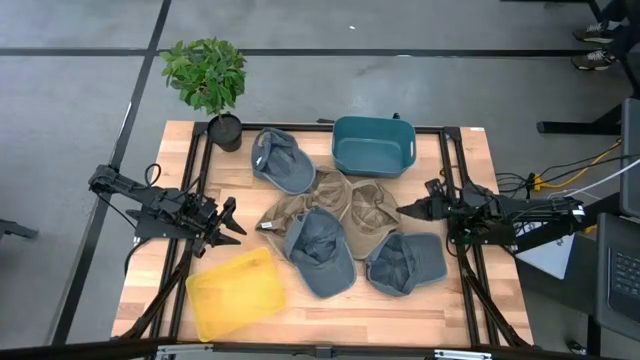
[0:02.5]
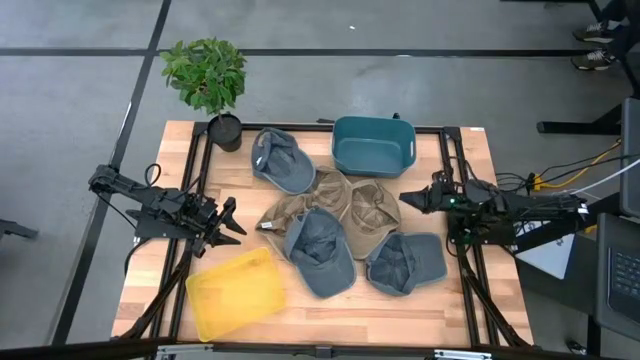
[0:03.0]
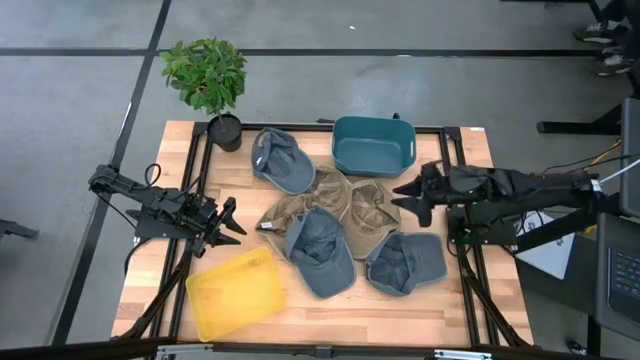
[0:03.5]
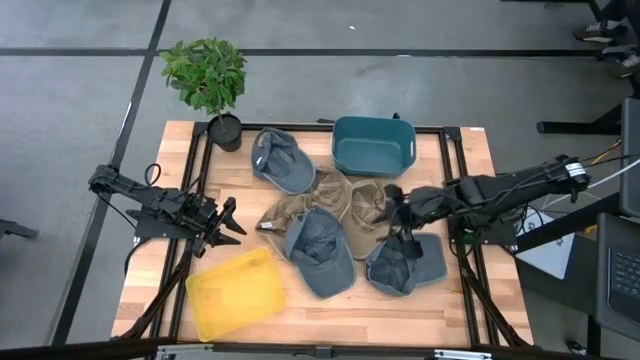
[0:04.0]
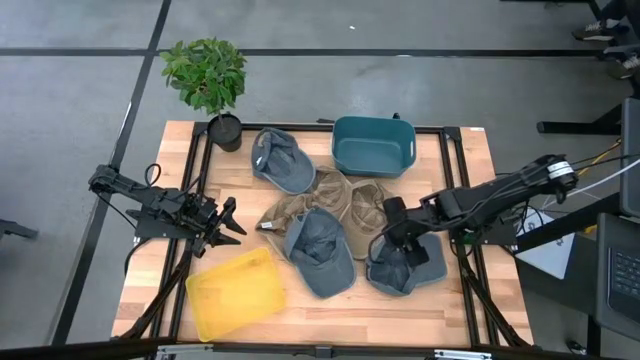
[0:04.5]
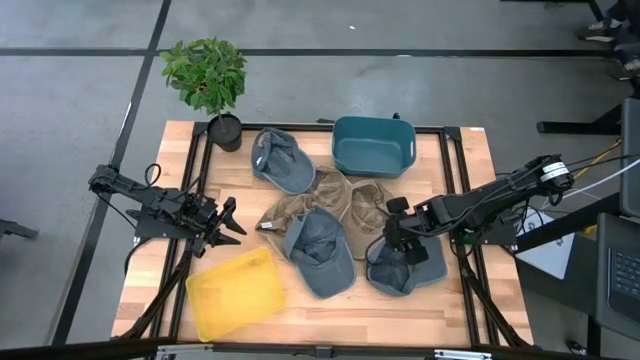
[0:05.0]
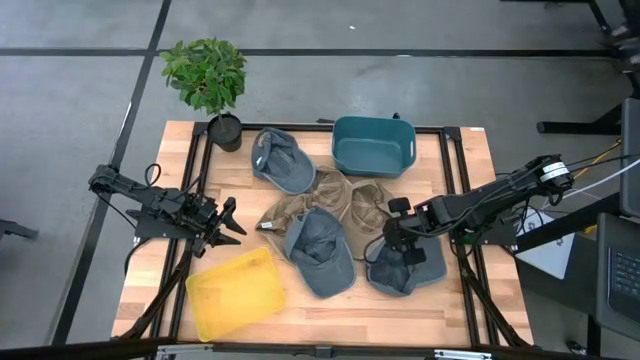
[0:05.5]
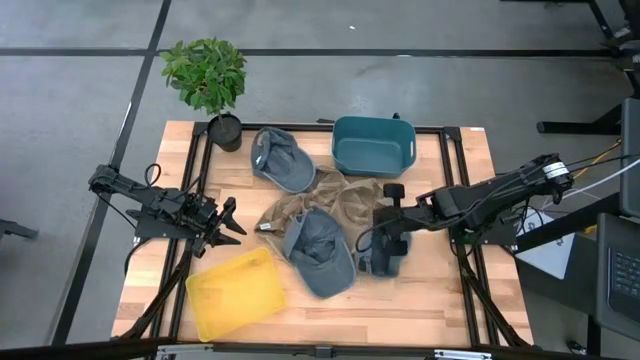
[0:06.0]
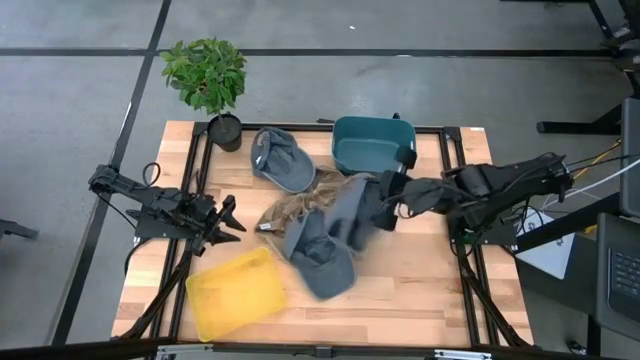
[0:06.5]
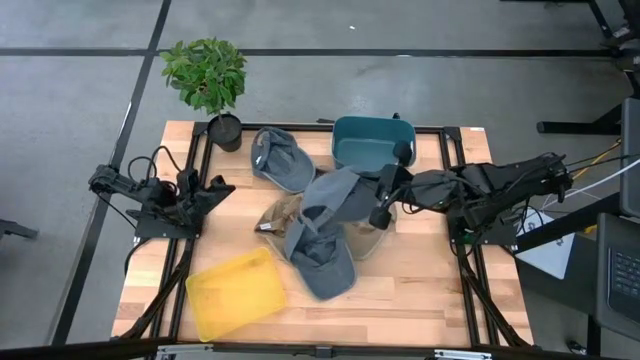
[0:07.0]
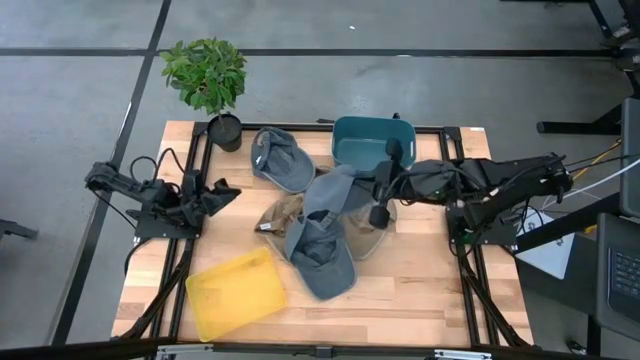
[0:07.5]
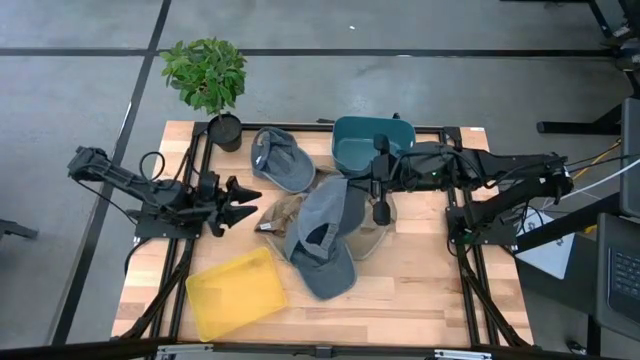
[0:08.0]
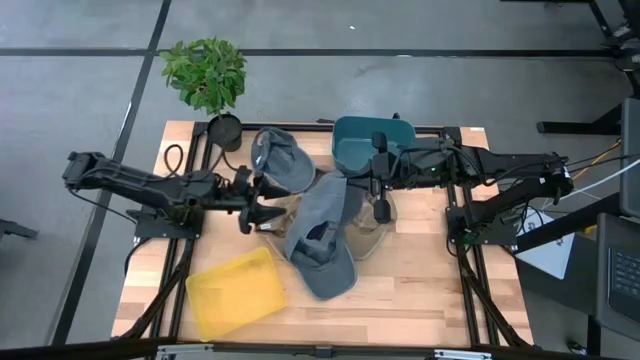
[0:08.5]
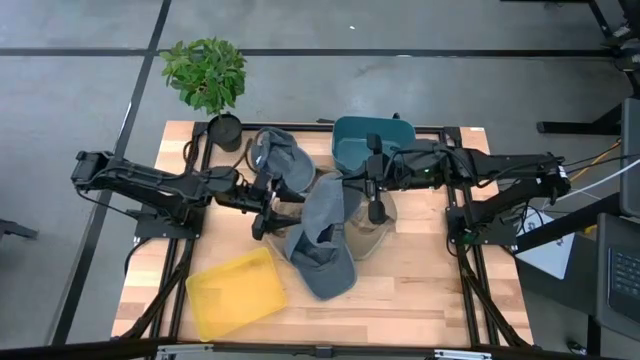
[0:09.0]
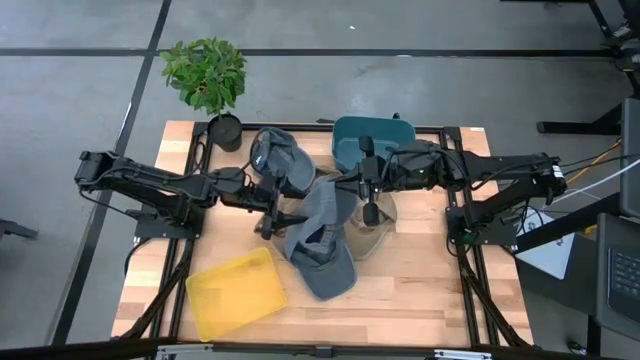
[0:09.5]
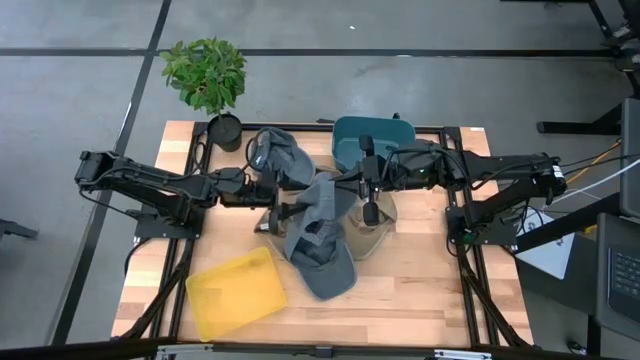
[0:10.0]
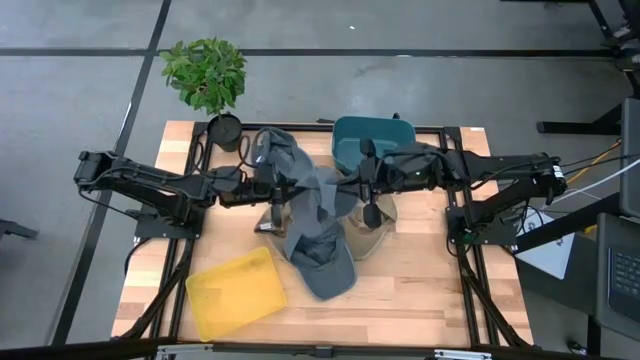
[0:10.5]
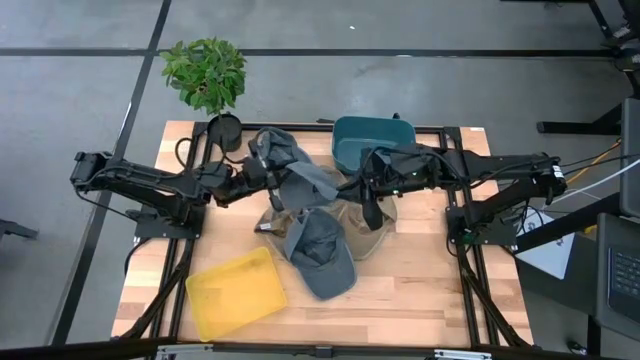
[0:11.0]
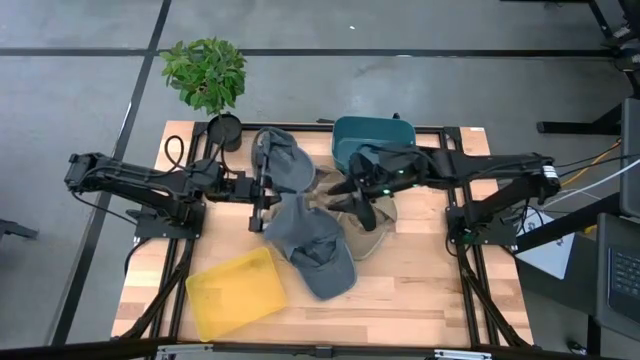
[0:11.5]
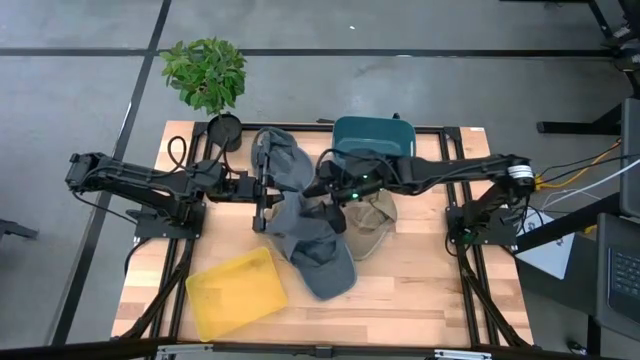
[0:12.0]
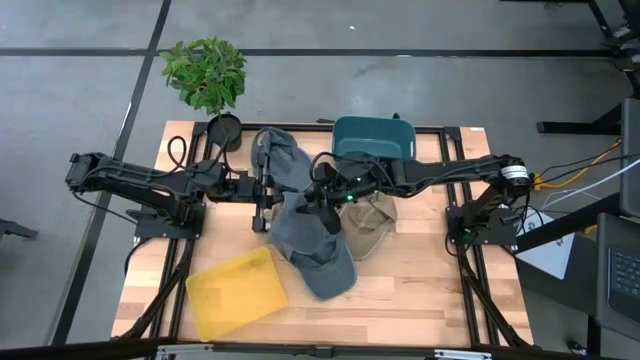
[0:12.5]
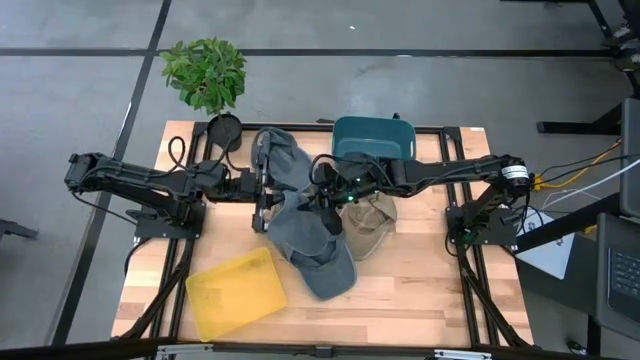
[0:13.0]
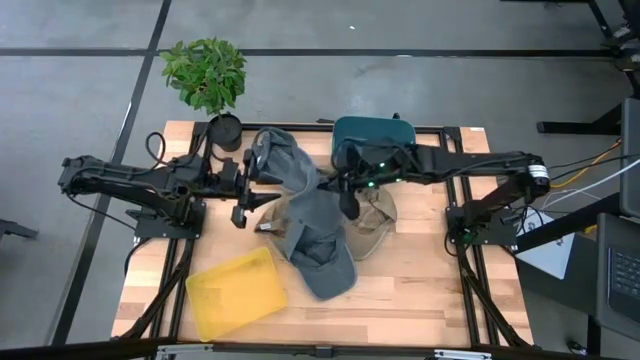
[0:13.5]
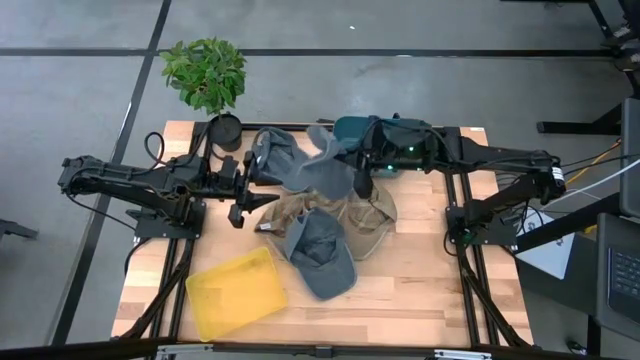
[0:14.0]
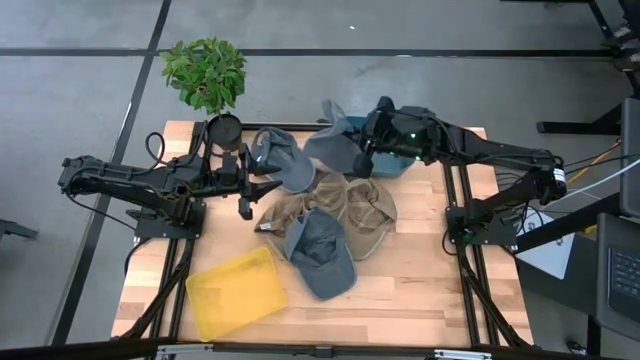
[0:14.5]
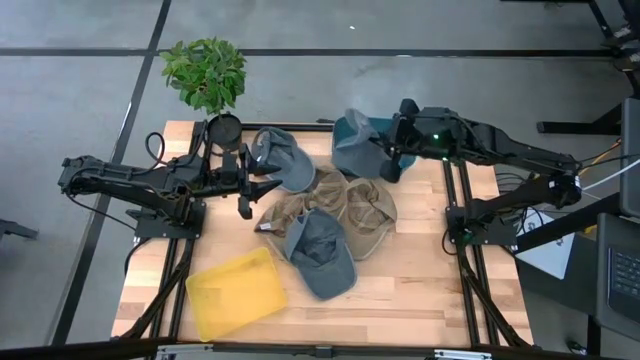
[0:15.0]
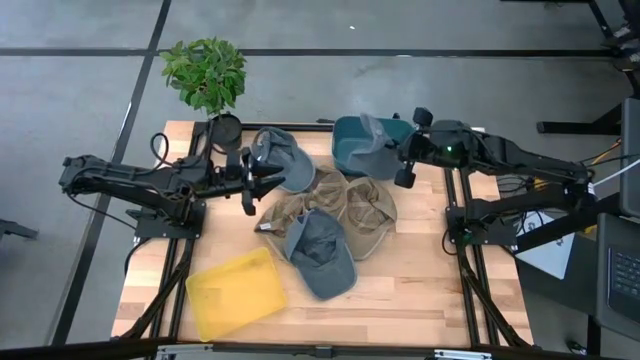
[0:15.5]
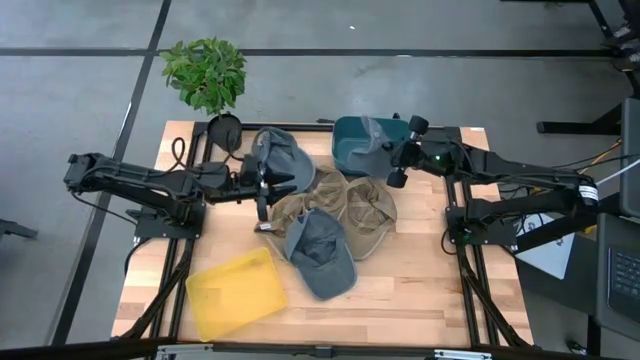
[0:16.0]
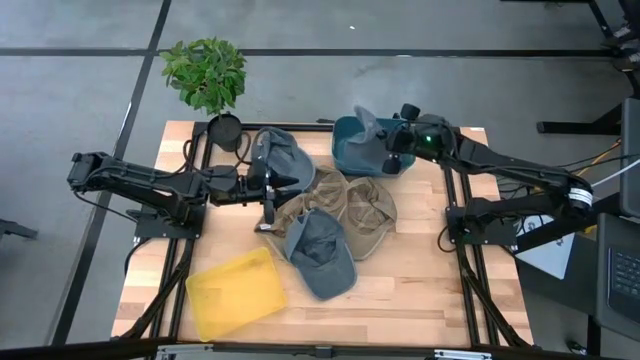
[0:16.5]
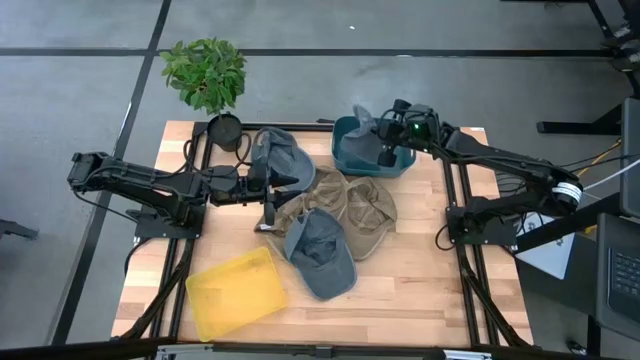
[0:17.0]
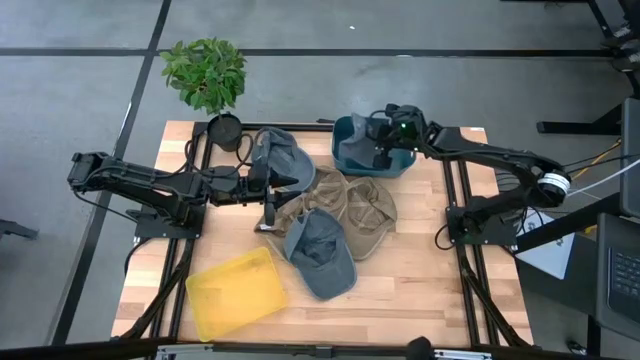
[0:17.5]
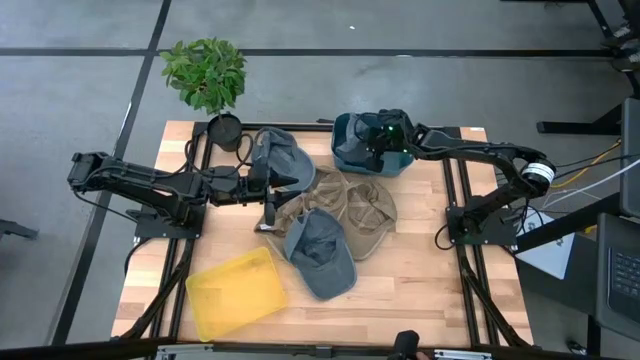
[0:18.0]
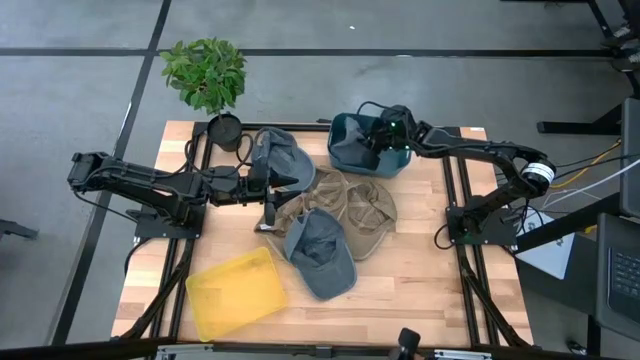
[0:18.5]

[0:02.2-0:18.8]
Task: Pick & Place hat
Put the right gray cap into the blue bin
